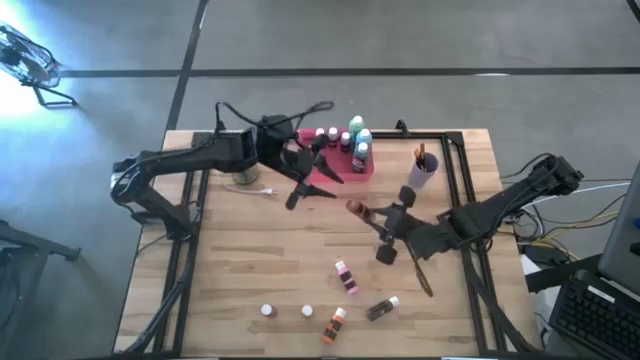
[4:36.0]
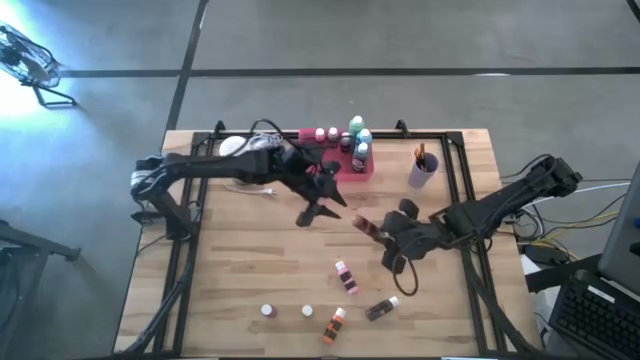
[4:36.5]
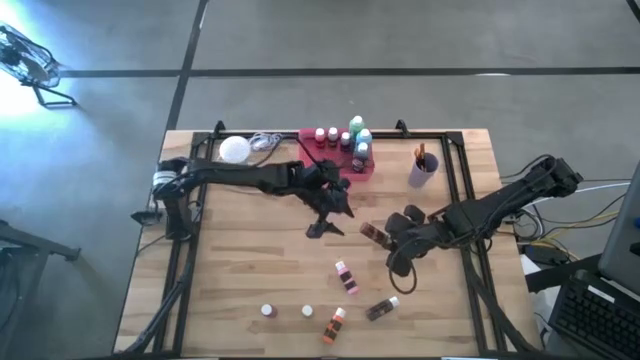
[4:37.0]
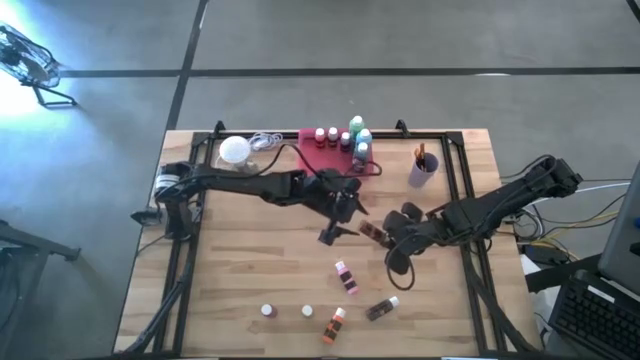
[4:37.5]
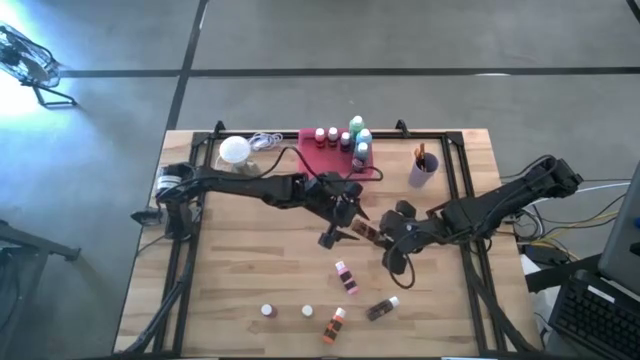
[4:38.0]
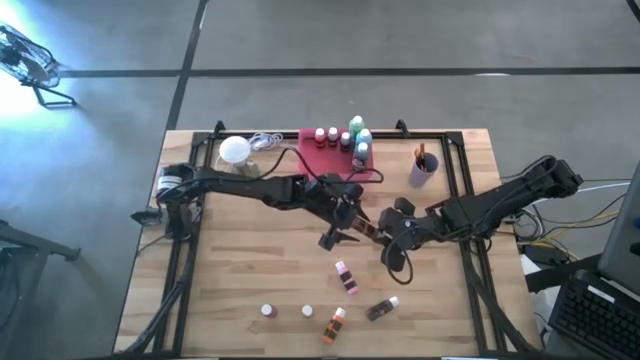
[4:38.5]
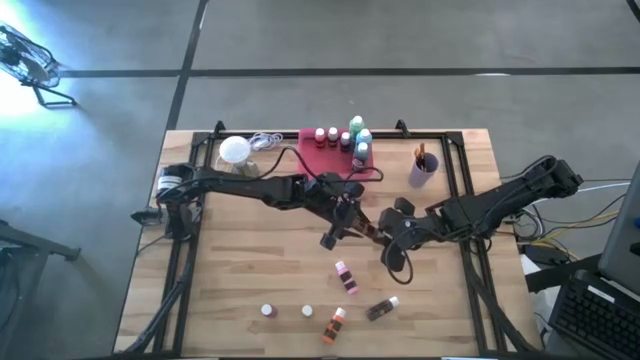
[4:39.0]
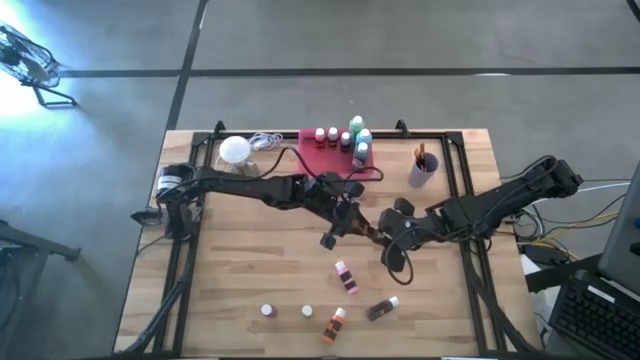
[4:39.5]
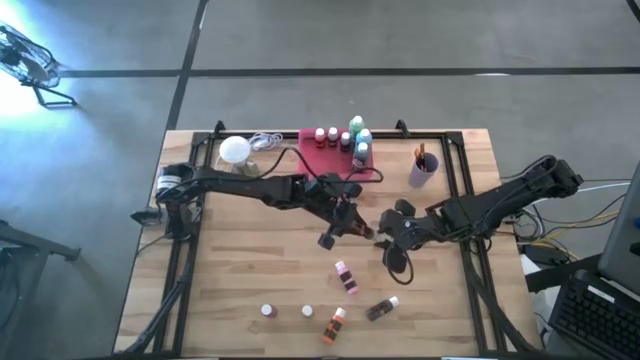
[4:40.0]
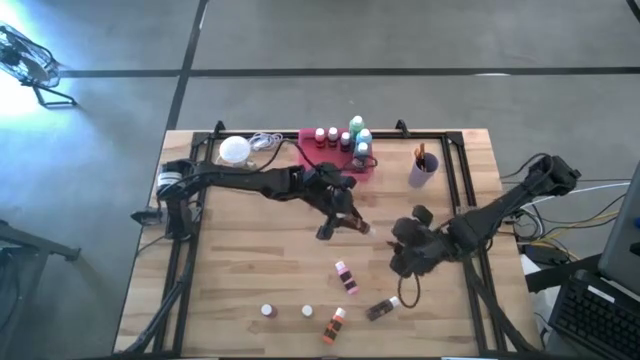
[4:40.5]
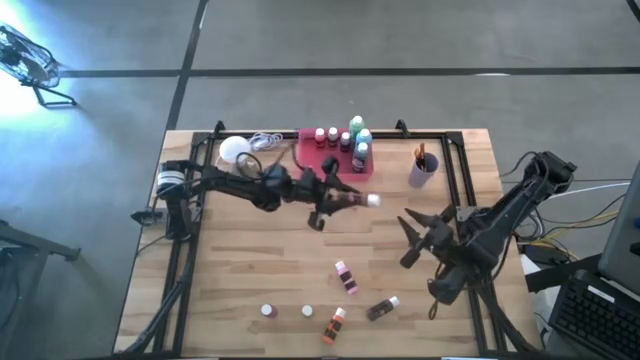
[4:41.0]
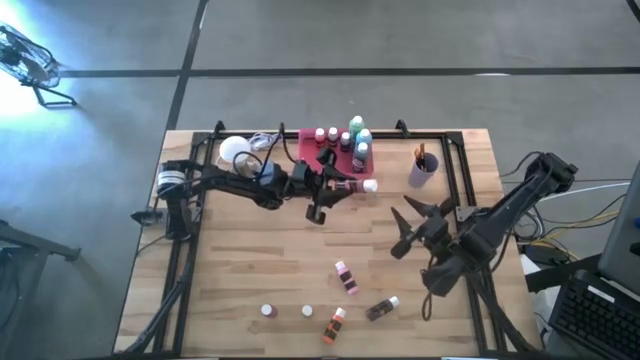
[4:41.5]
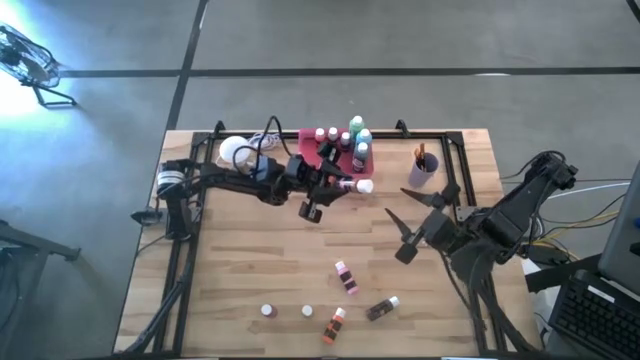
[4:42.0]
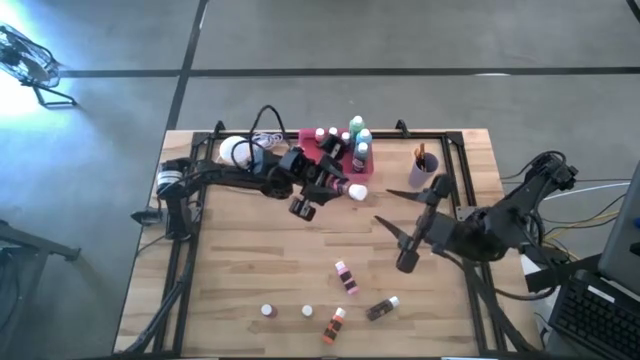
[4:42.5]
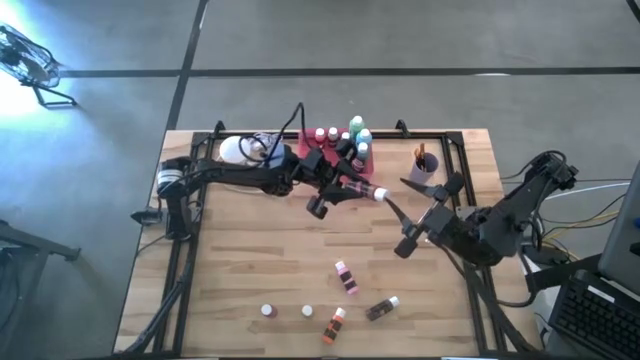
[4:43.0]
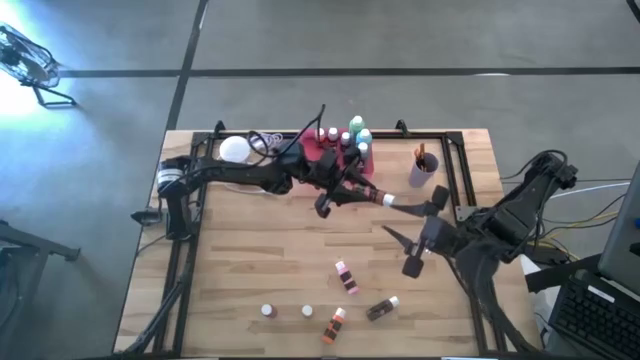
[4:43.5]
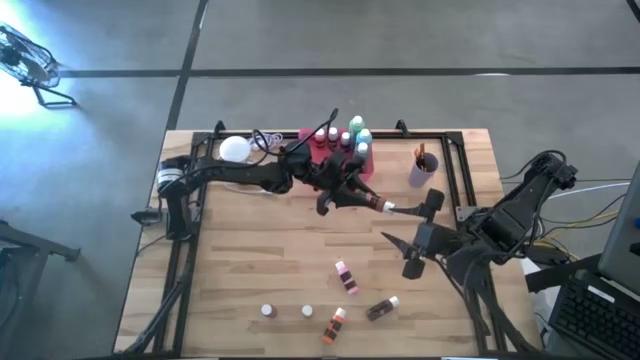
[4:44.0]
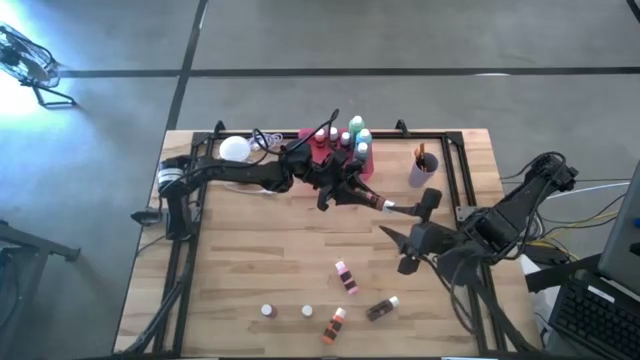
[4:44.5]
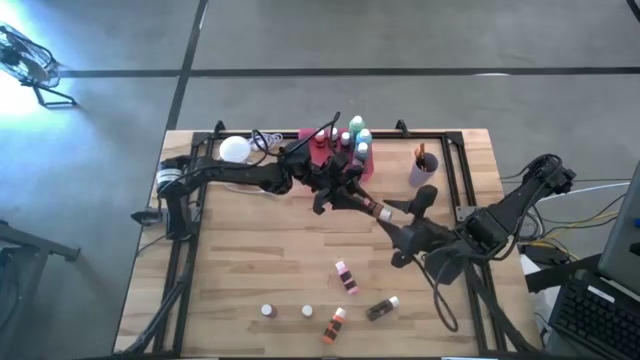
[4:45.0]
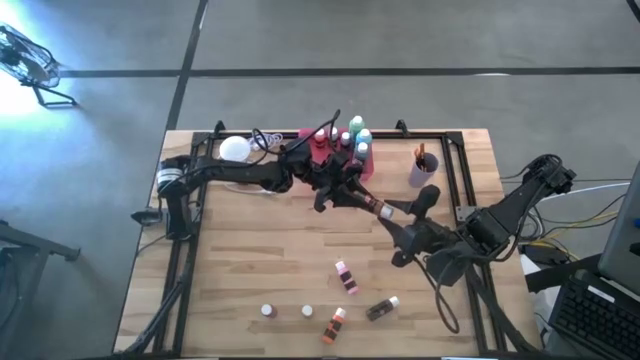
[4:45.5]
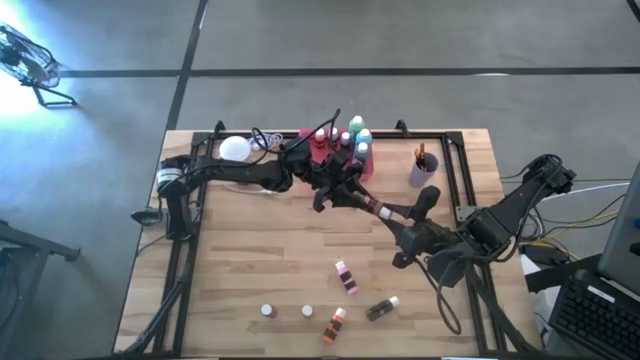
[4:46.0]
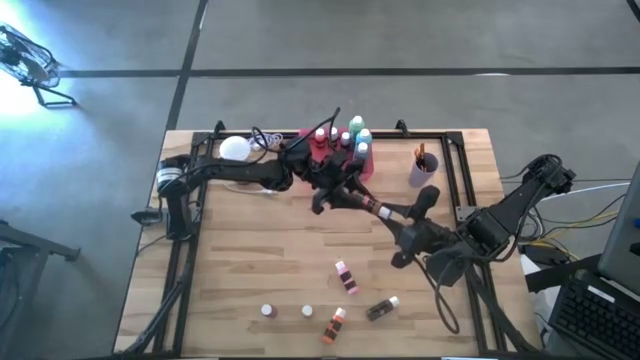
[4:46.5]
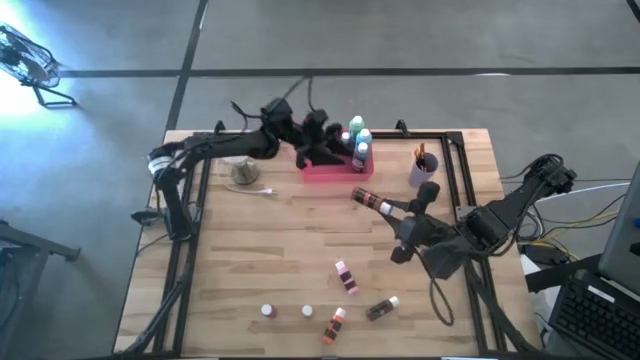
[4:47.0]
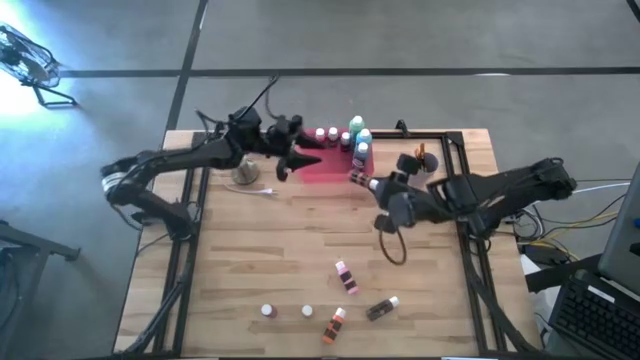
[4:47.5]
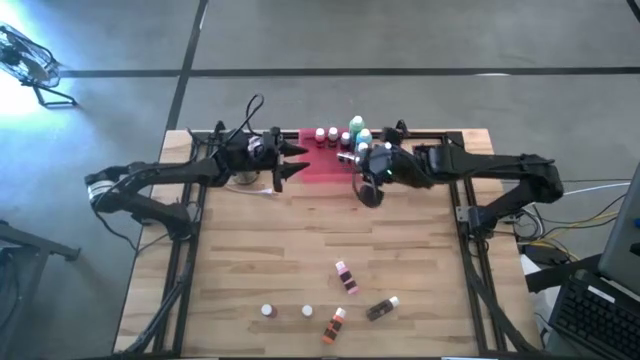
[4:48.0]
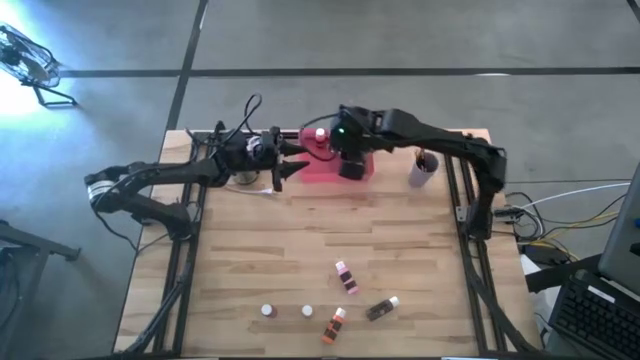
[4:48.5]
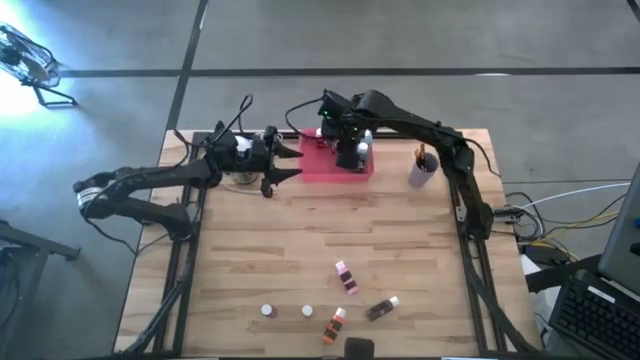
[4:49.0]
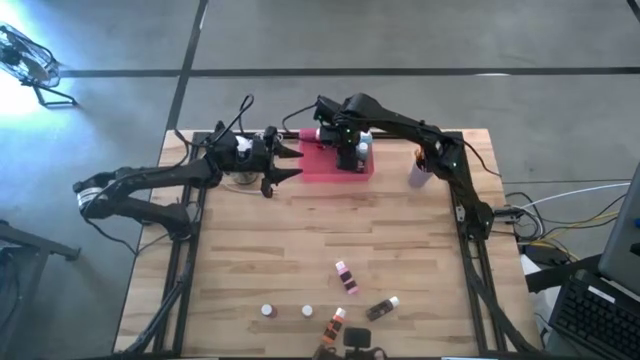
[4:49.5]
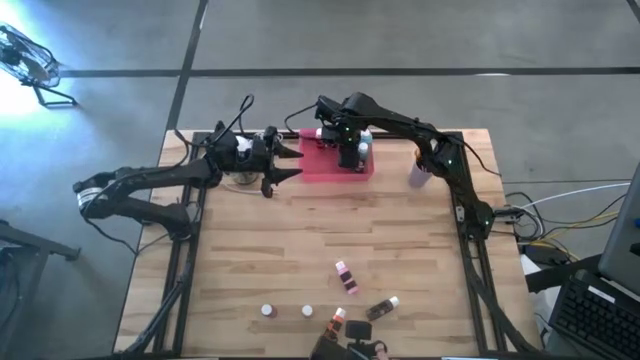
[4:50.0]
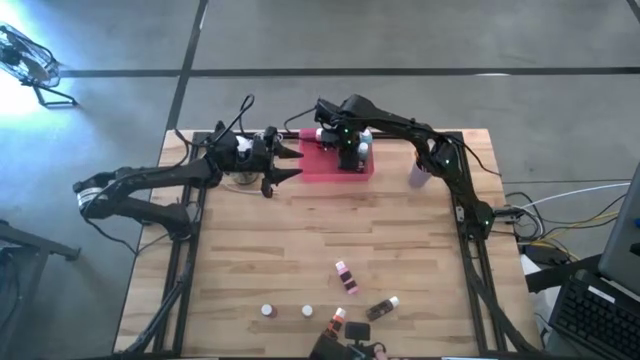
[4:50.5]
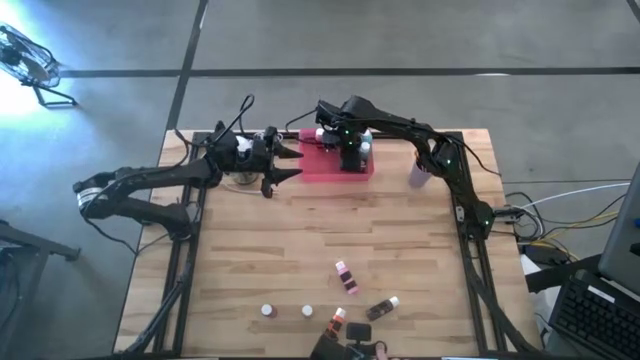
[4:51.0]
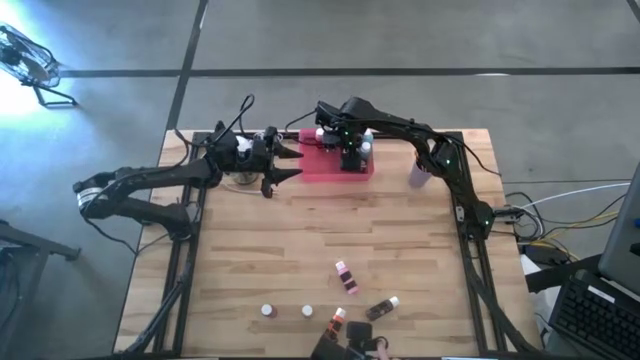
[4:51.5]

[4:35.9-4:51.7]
Task: Pick & Place Paint Supplies
Put the brown black paint bottle into the pink bin

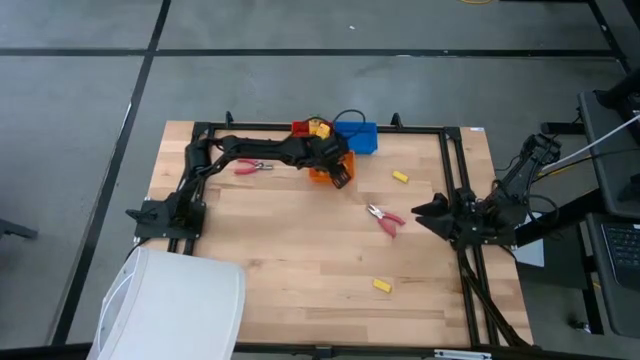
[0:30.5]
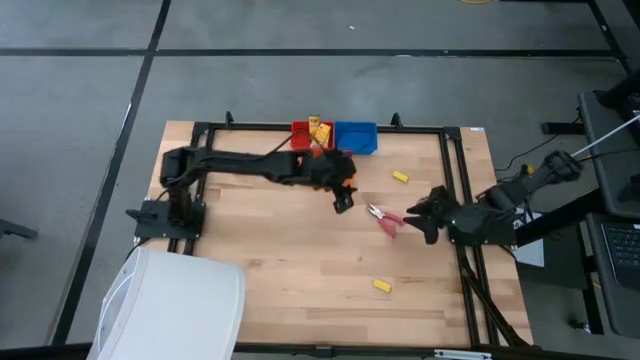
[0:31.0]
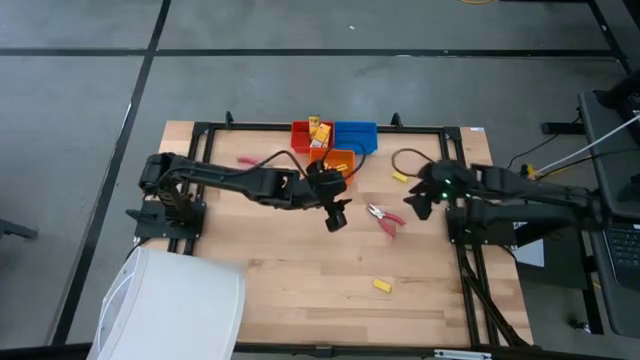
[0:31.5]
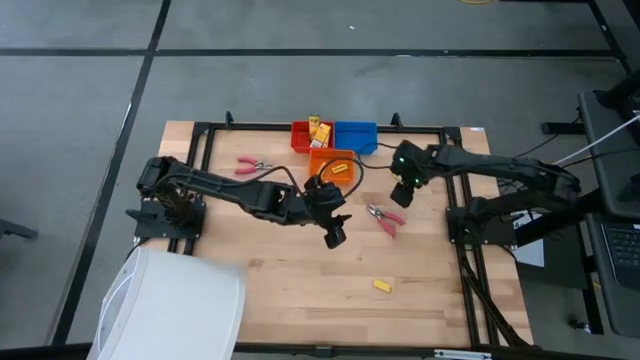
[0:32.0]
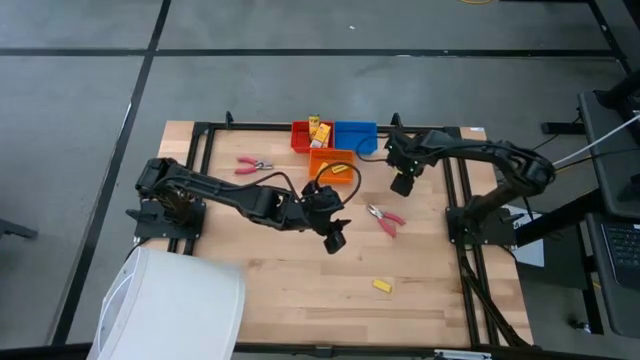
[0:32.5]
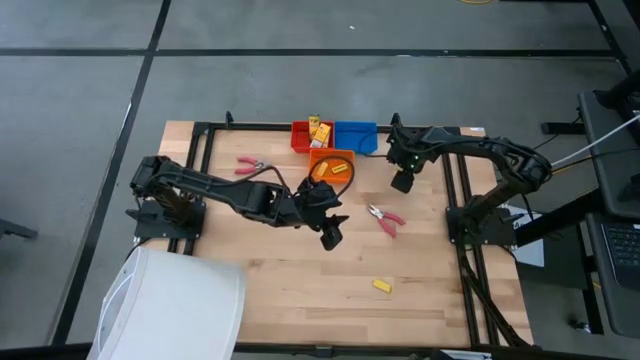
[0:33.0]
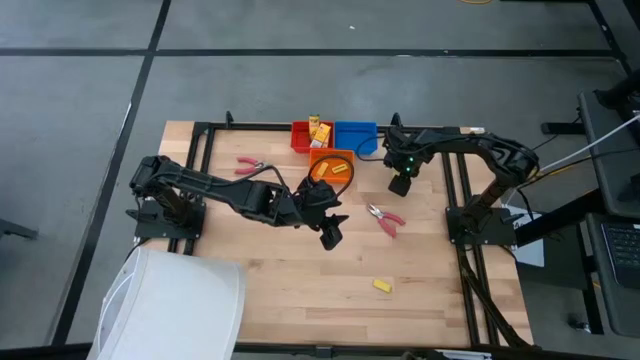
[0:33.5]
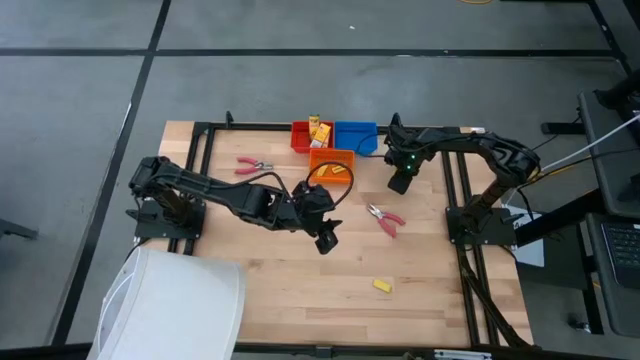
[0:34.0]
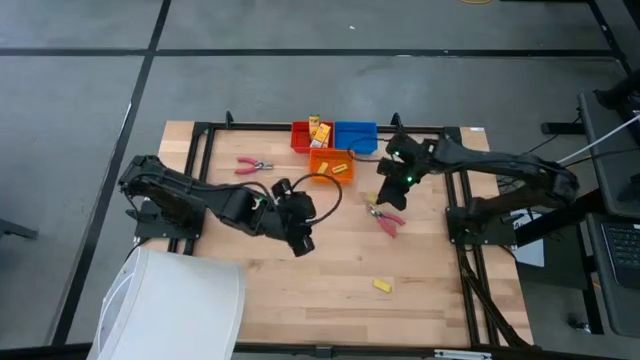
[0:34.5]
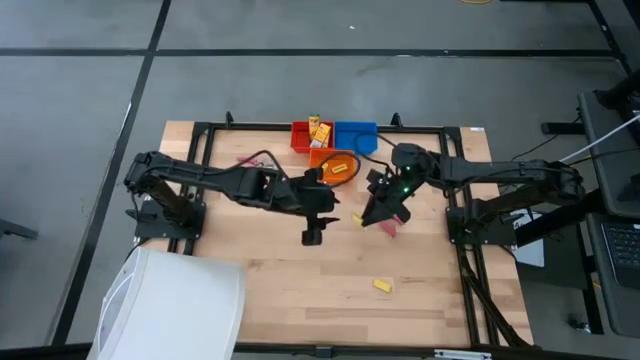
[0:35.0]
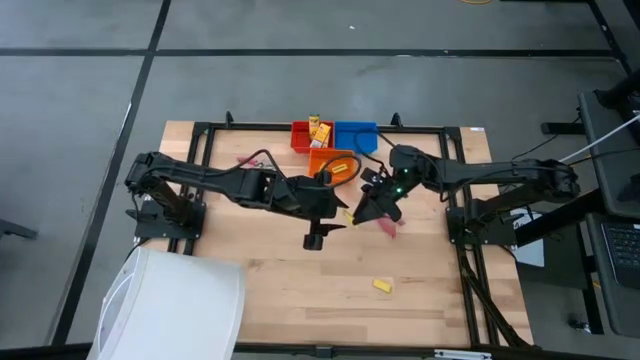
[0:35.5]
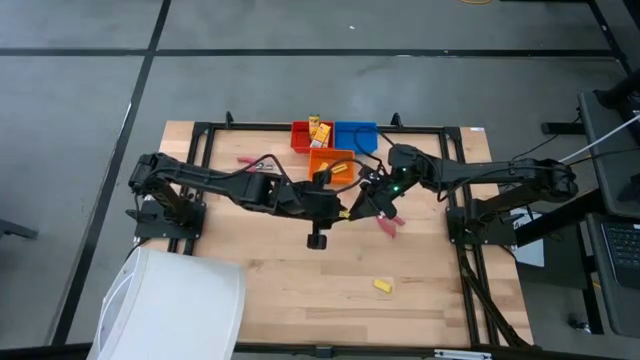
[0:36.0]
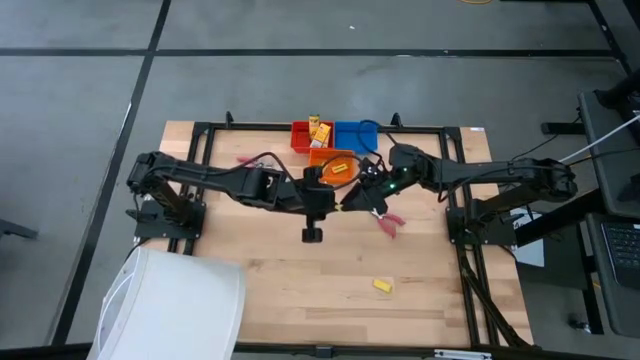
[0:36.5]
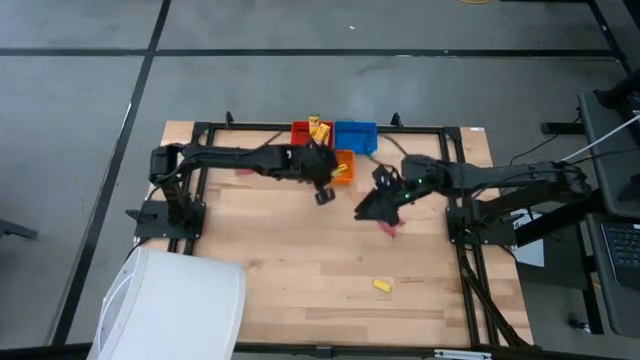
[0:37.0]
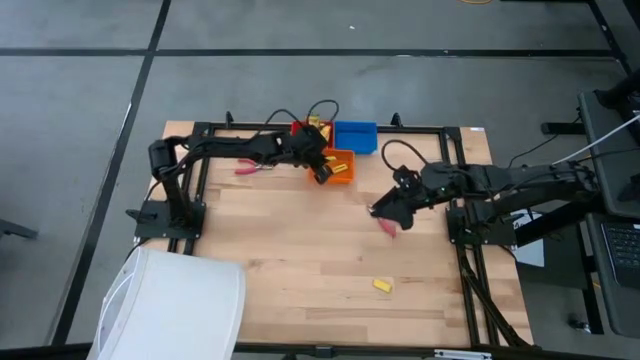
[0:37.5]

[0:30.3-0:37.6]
Task: Pick & Place School Supplies
Put the yellow eraser into the orange bin
